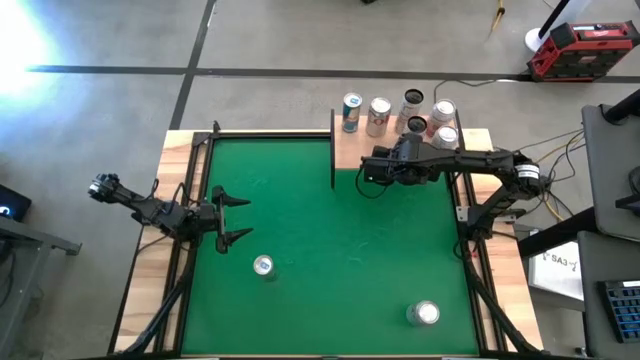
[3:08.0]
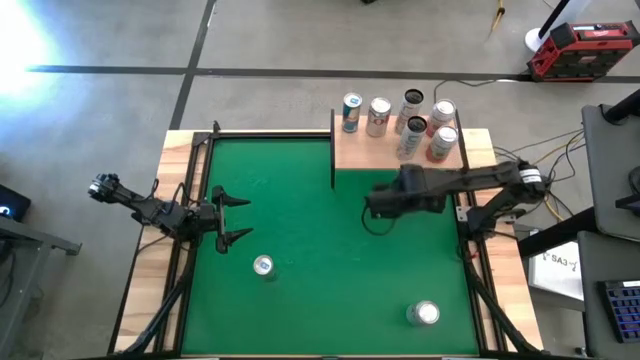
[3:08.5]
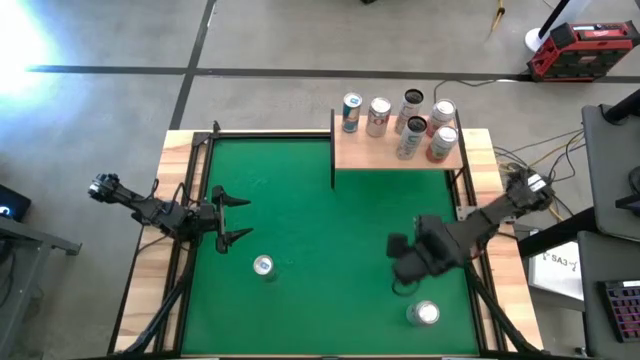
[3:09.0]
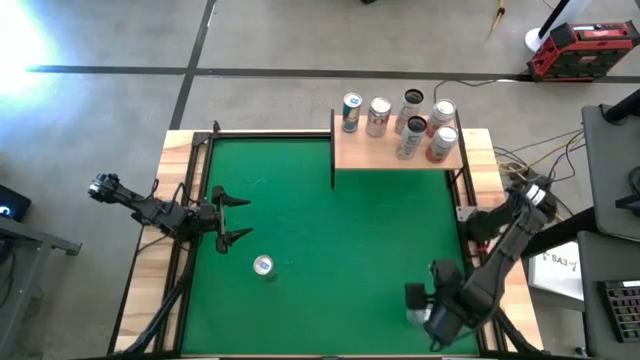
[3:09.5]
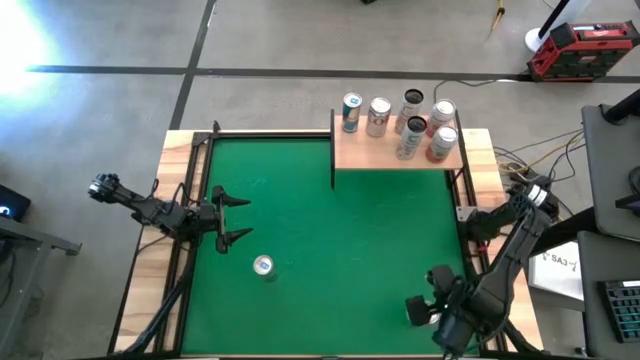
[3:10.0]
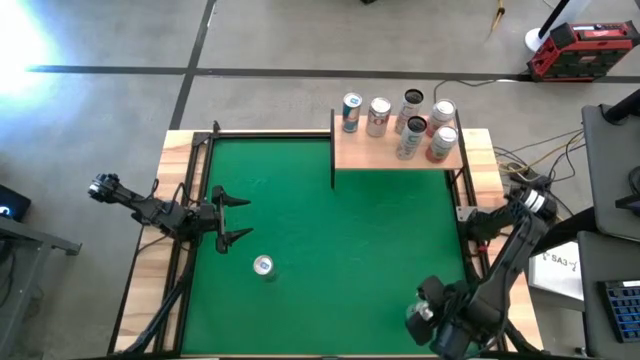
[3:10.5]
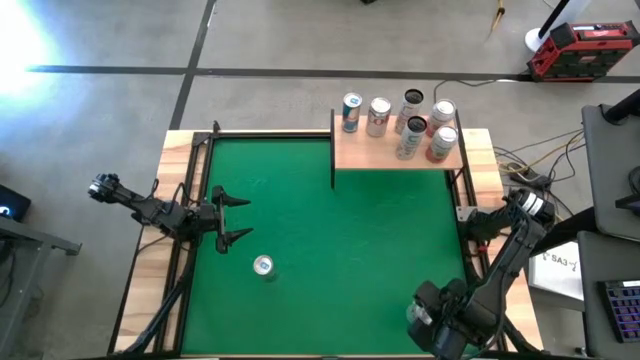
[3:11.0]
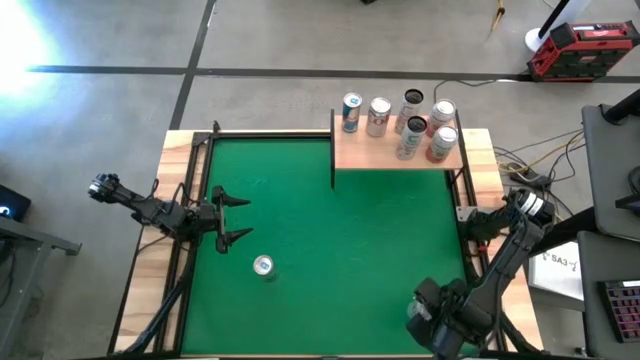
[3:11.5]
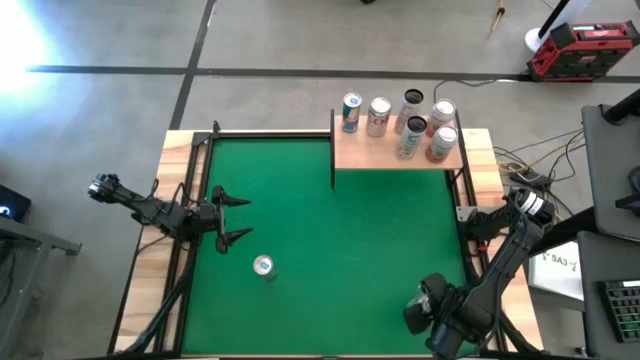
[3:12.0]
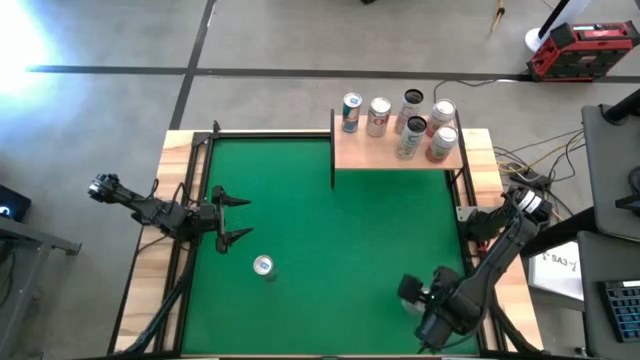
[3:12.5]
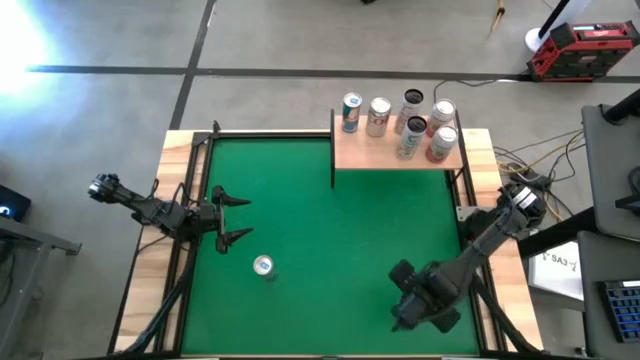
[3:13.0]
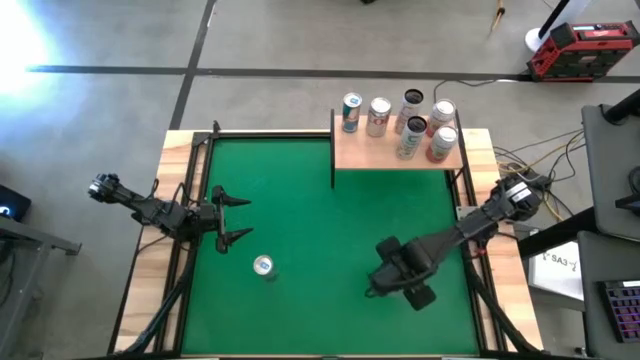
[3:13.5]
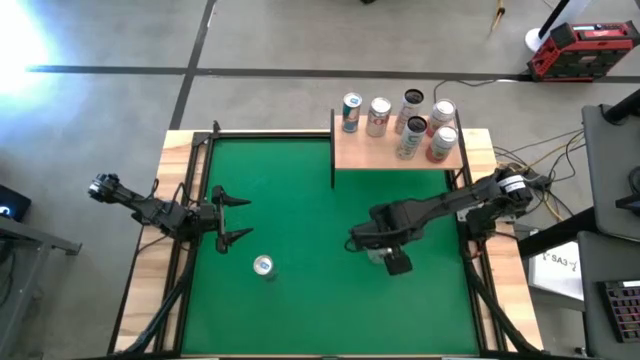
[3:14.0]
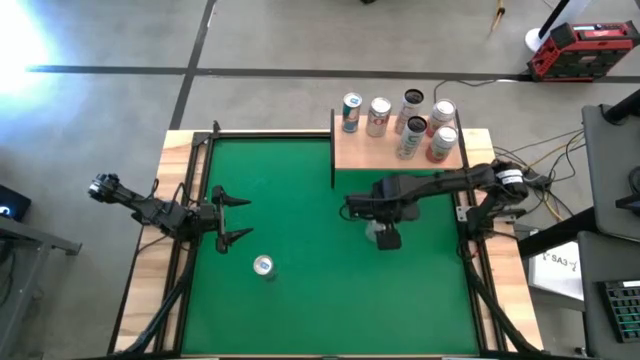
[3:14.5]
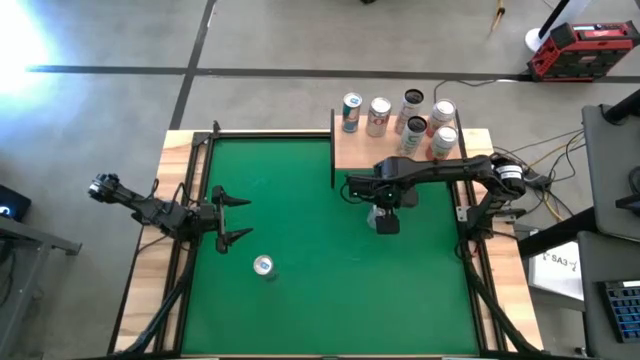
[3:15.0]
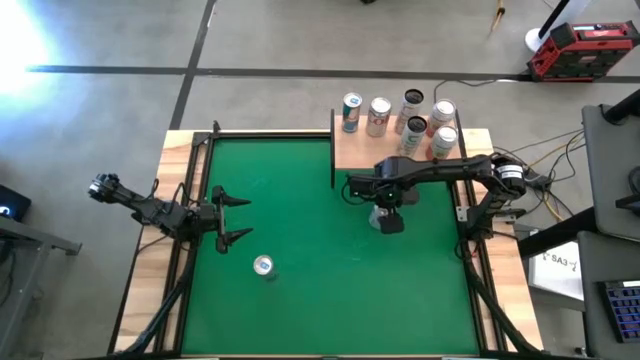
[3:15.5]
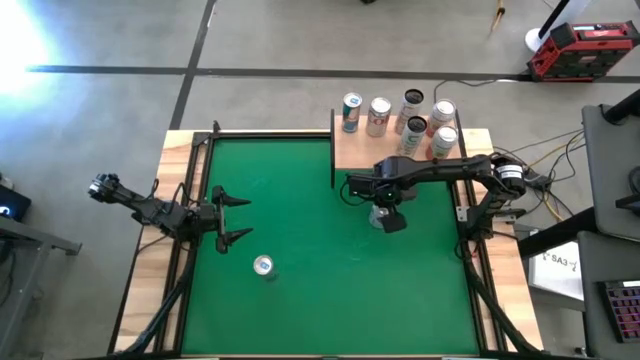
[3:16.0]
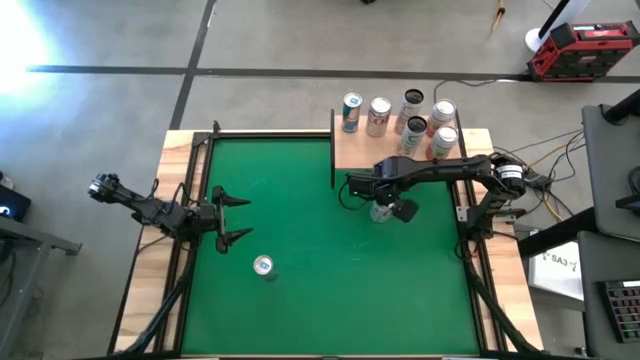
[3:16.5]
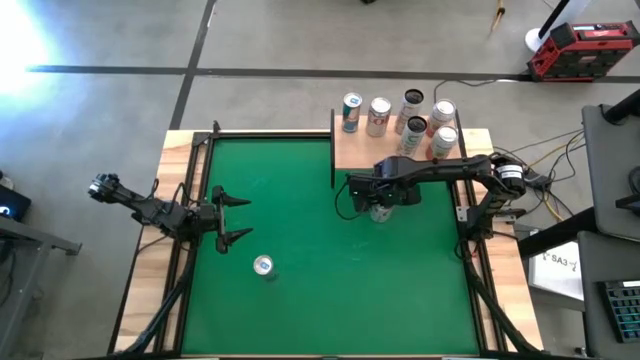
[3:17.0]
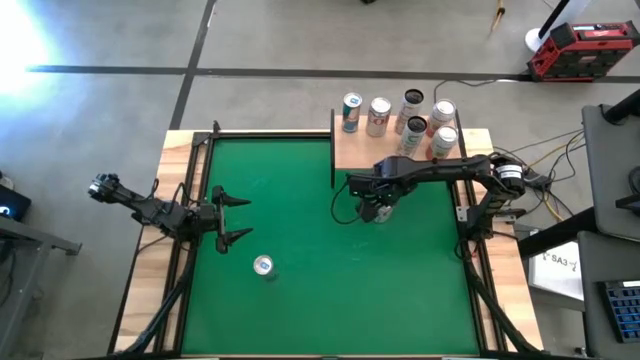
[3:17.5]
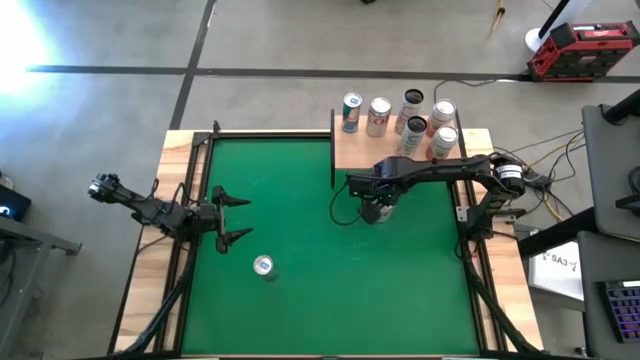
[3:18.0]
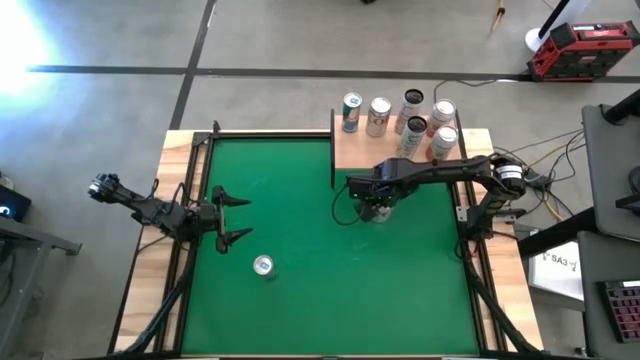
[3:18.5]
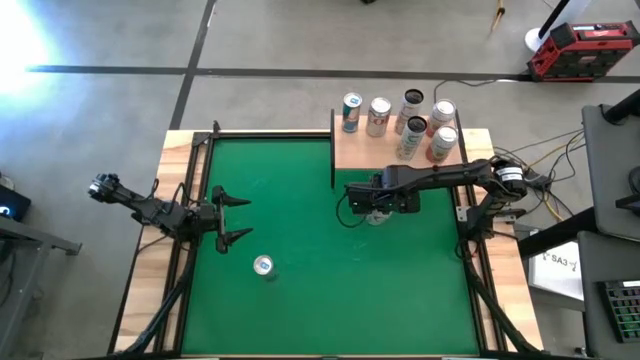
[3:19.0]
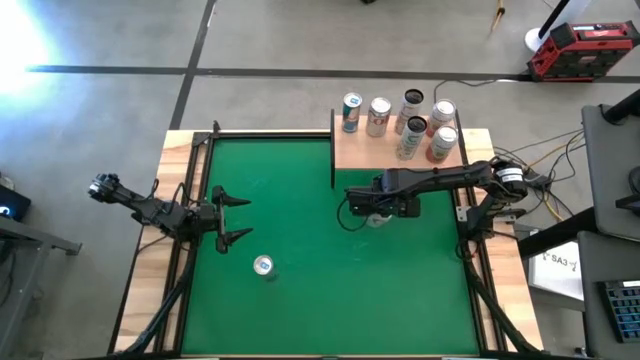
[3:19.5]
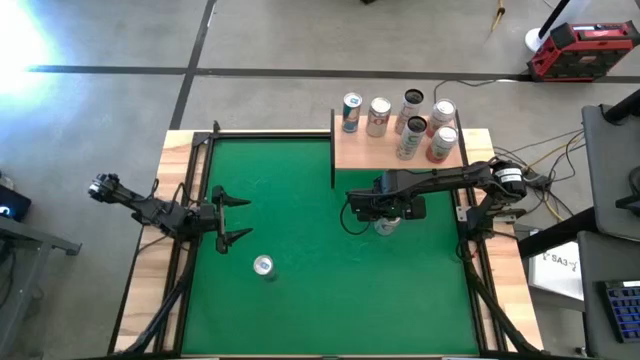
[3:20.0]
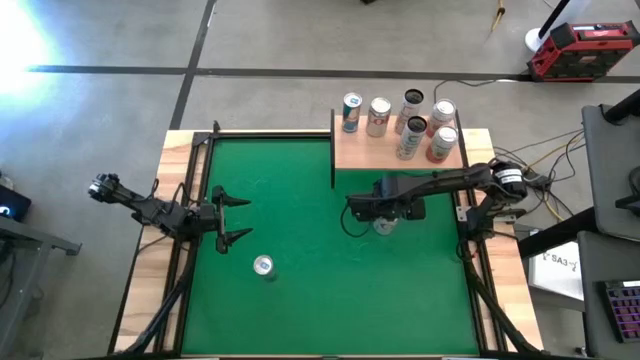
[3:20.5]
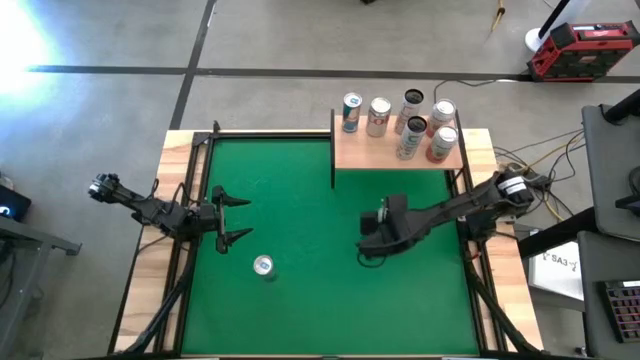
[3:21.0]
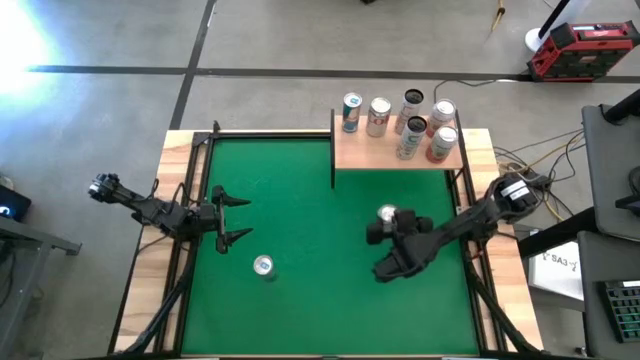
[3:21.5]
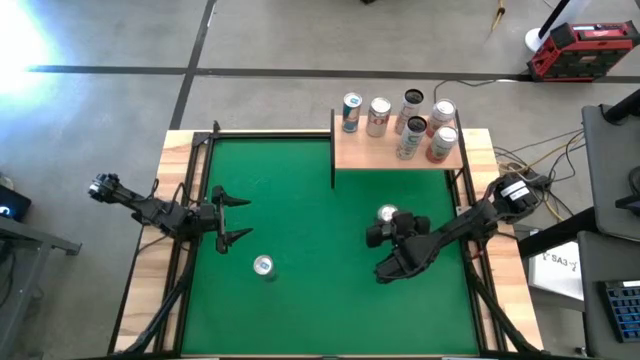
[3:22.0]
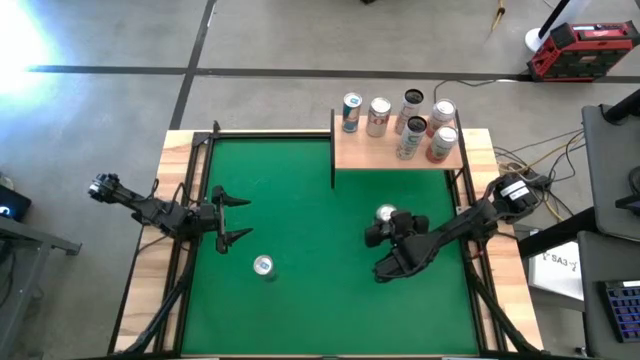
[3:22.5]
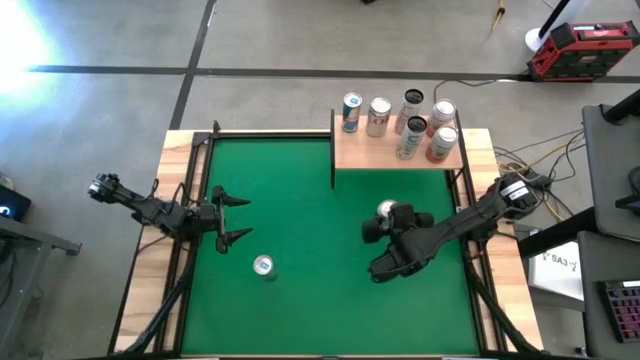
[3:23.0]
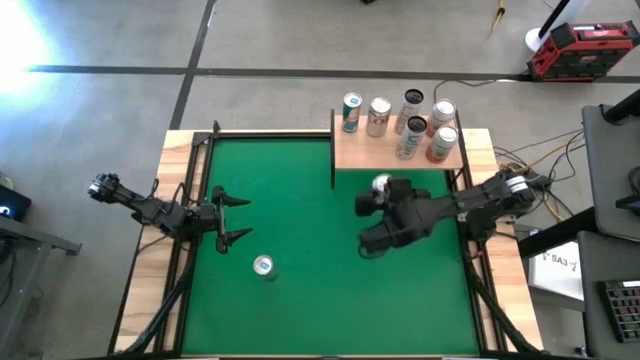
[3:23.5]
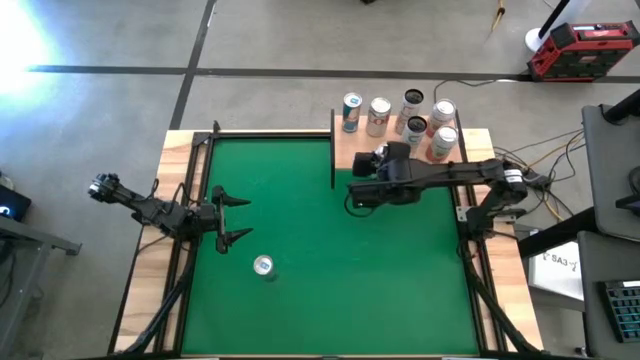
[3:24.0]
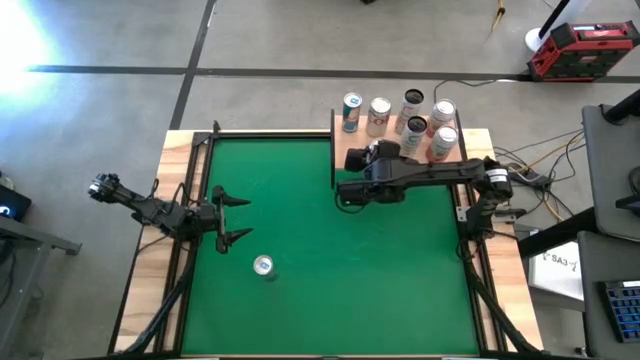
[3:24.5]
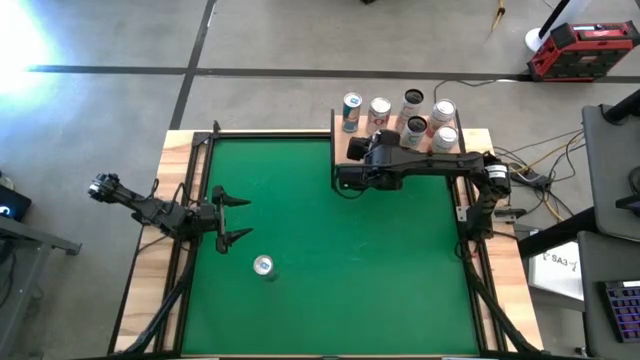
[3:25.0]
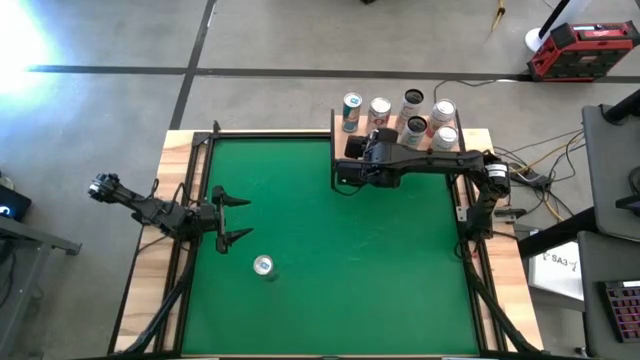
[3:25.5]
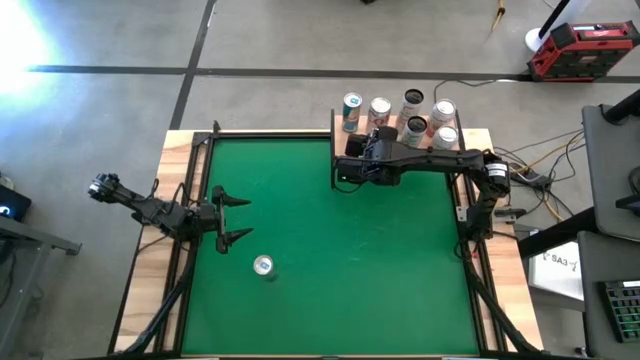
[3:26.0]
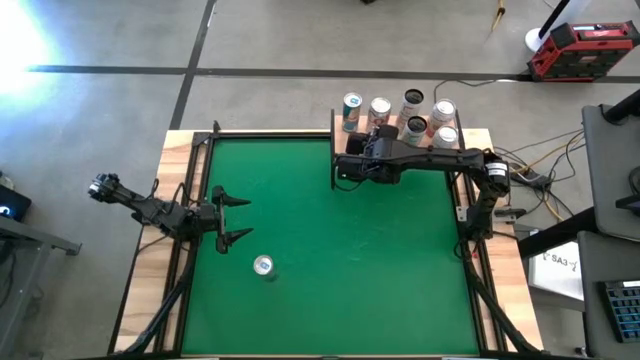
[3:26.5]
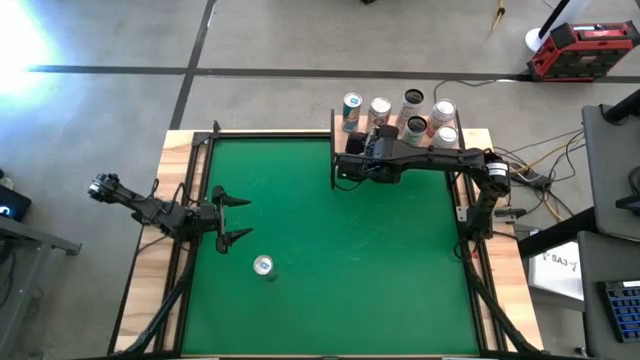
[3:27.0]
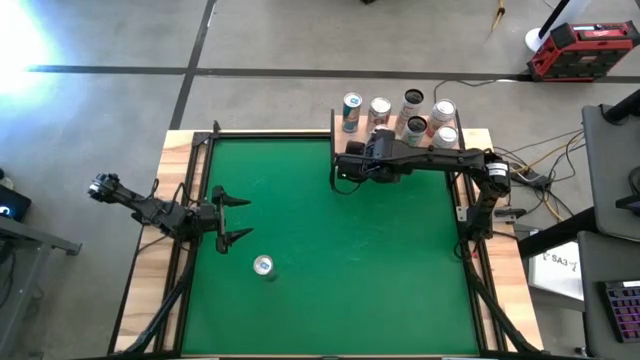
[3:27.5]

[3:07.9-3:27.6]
Task: Place canned beverage on shelf
Put the red-silver soda can on the shelf aligned with the other red-silver soda can
